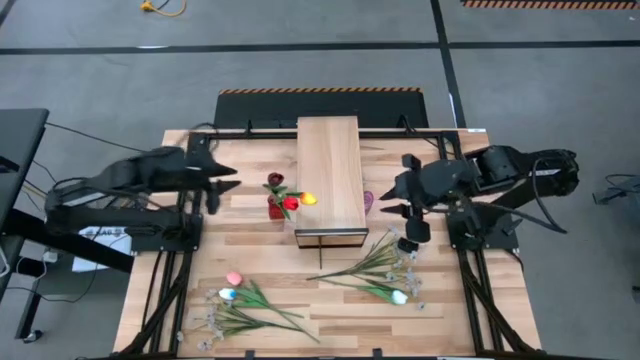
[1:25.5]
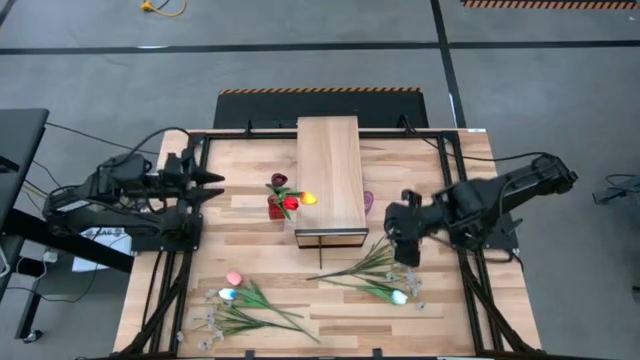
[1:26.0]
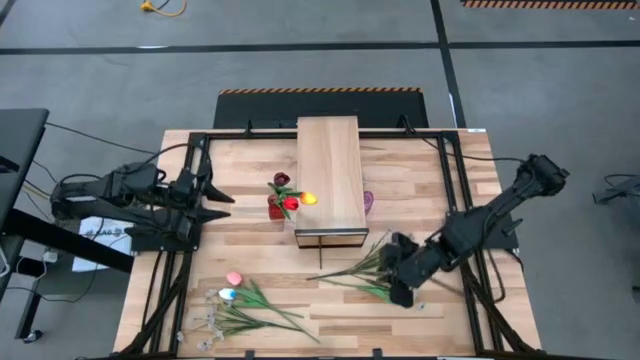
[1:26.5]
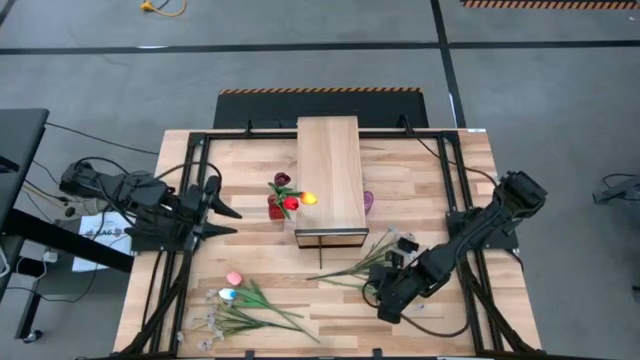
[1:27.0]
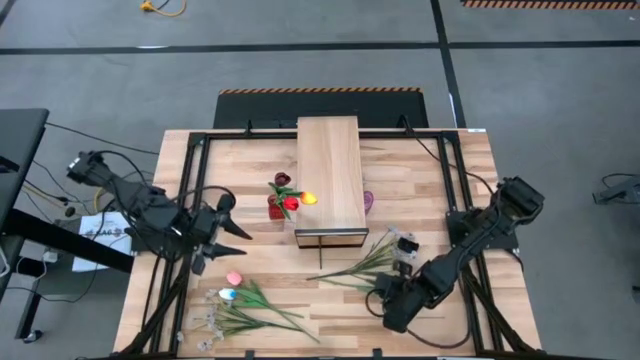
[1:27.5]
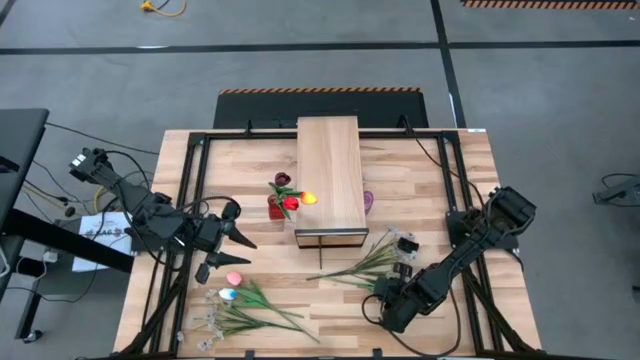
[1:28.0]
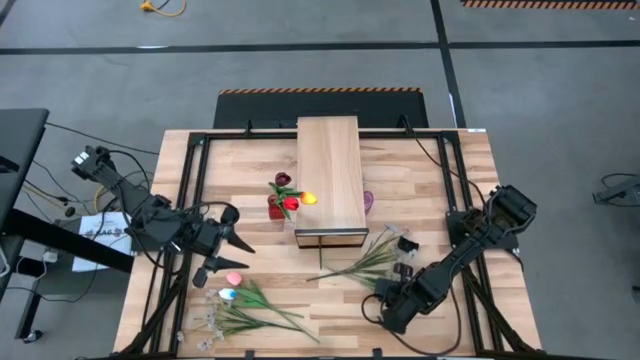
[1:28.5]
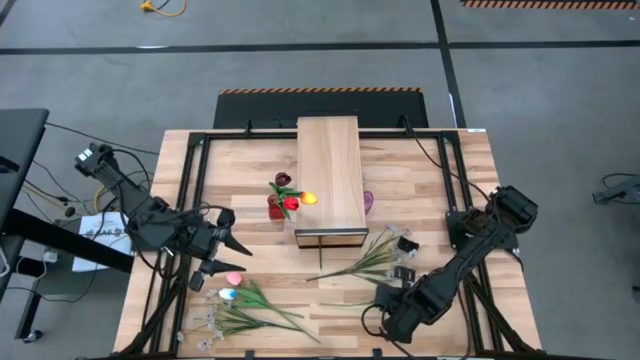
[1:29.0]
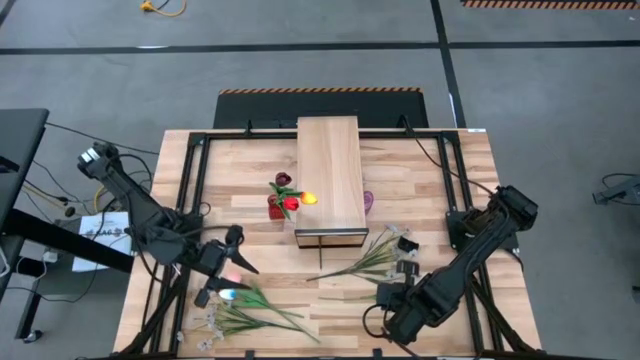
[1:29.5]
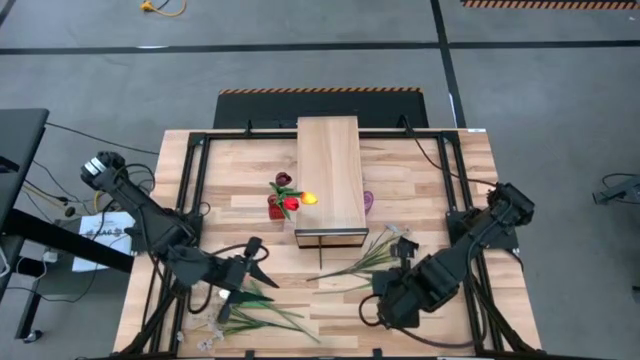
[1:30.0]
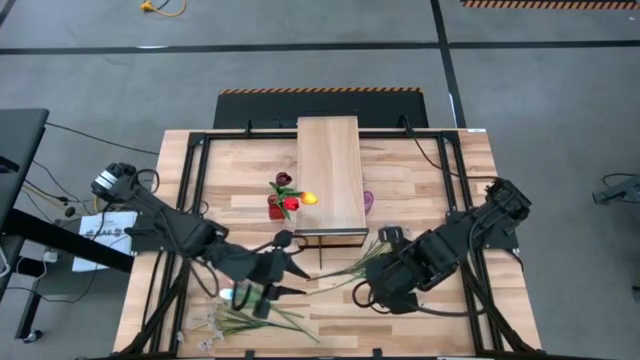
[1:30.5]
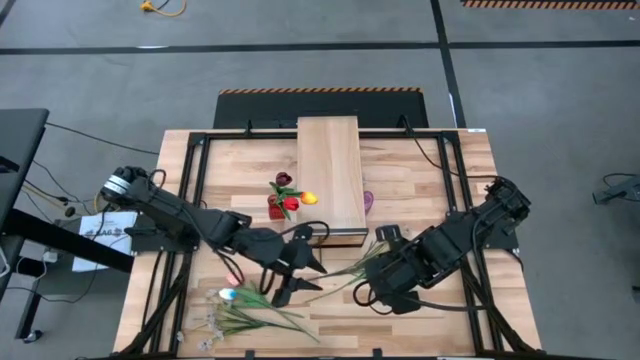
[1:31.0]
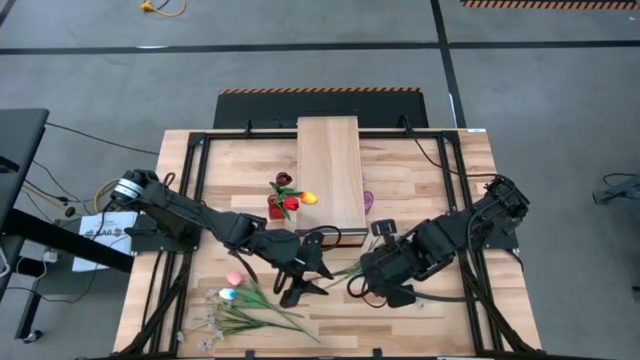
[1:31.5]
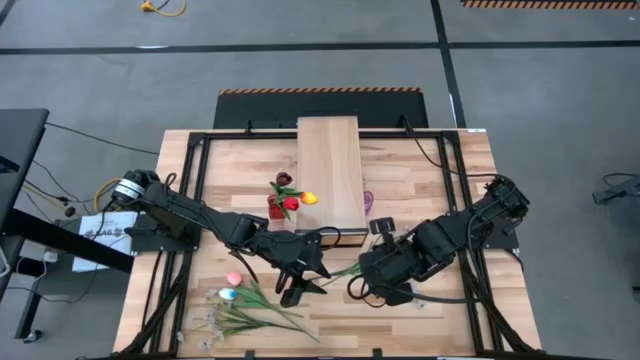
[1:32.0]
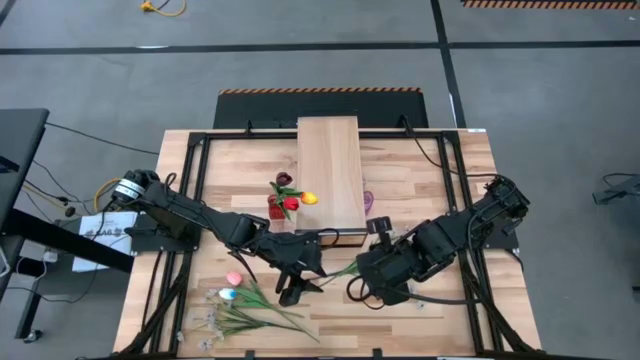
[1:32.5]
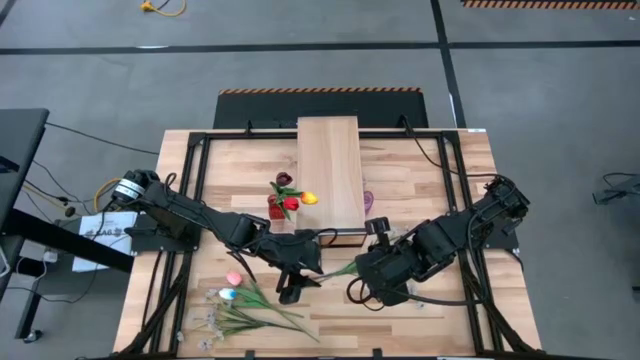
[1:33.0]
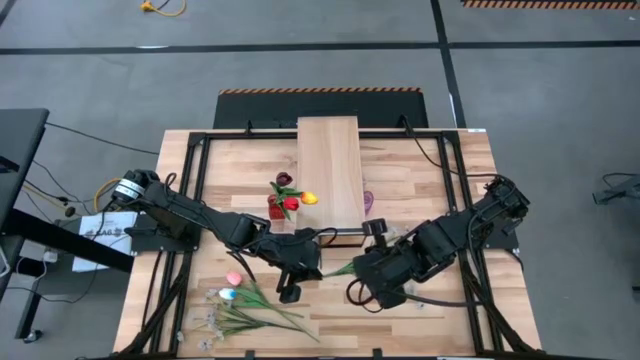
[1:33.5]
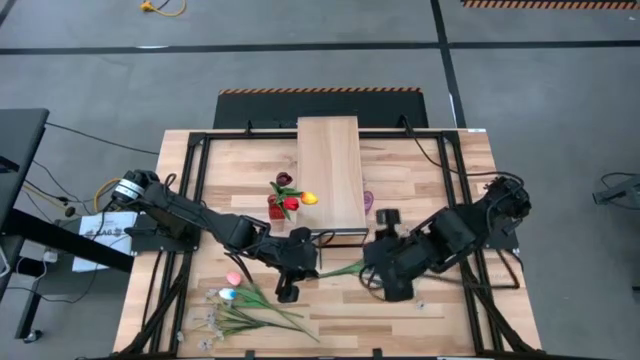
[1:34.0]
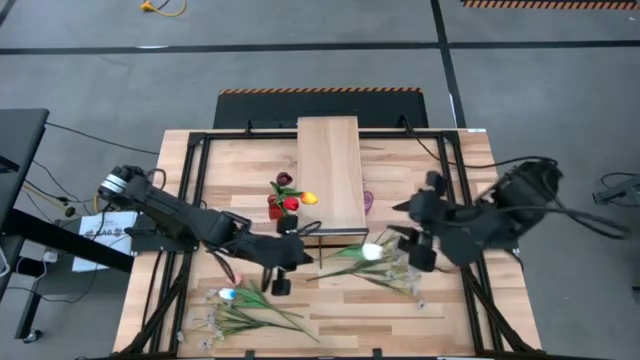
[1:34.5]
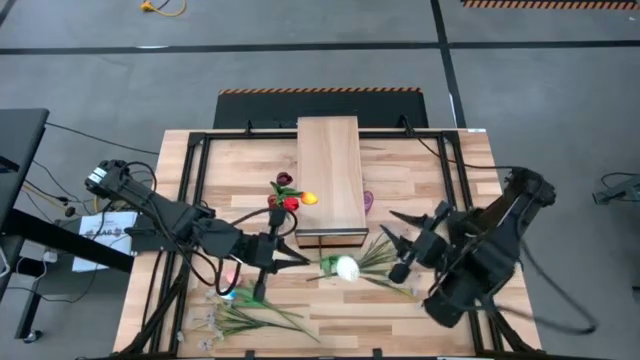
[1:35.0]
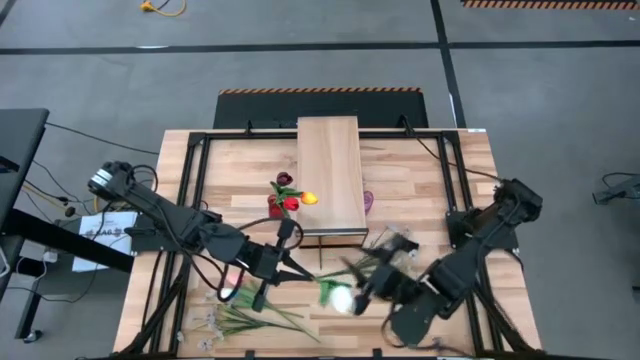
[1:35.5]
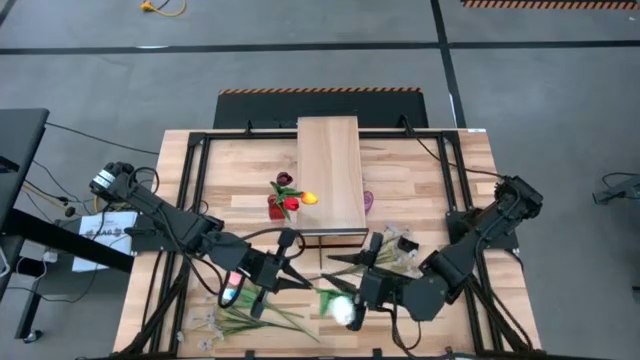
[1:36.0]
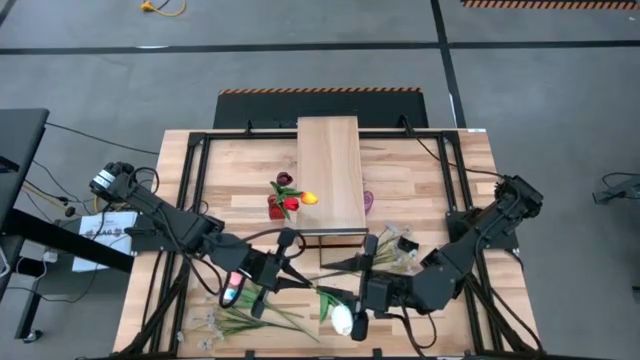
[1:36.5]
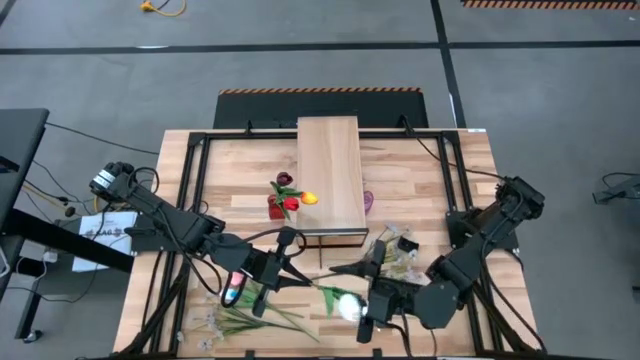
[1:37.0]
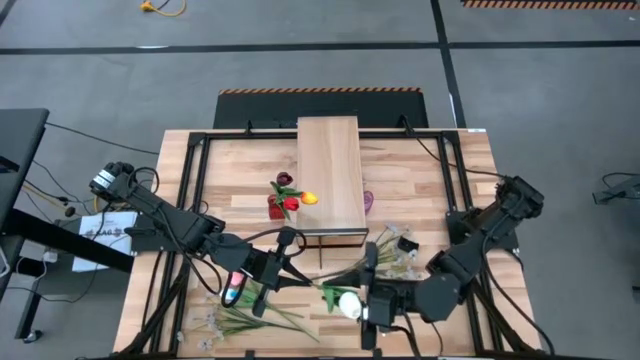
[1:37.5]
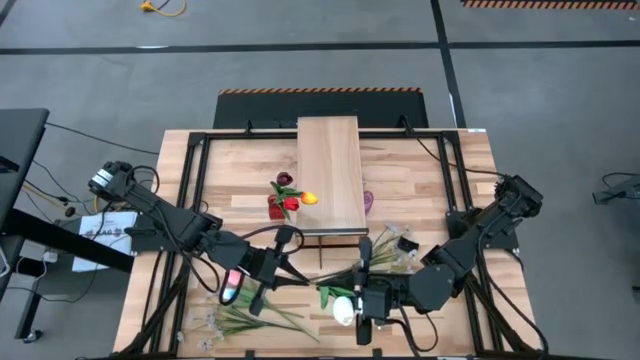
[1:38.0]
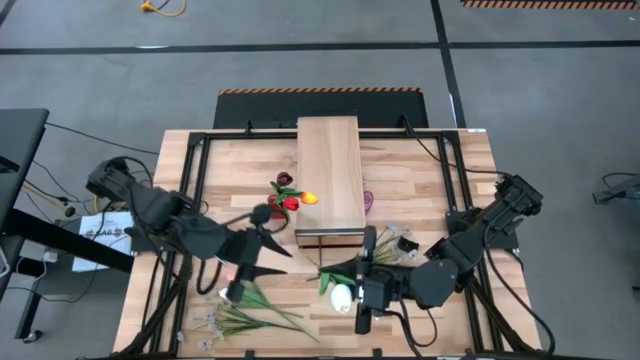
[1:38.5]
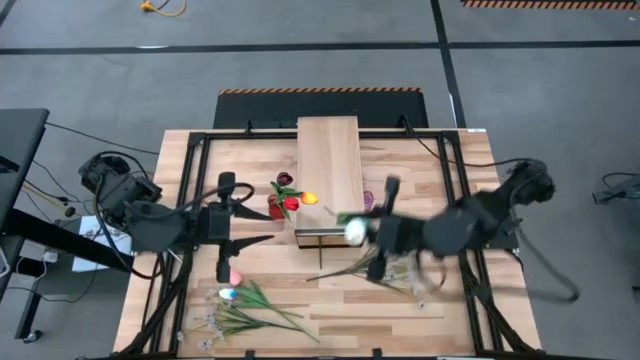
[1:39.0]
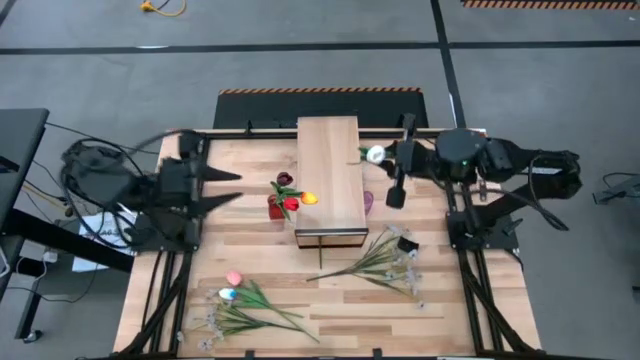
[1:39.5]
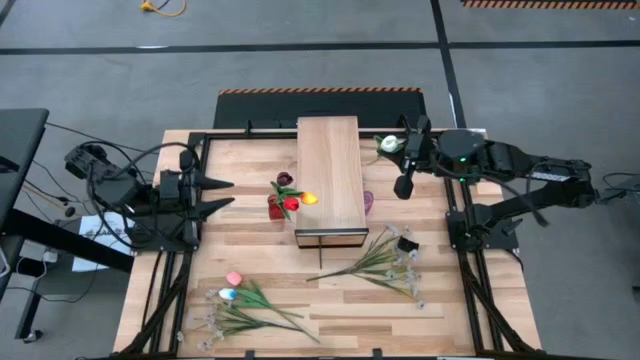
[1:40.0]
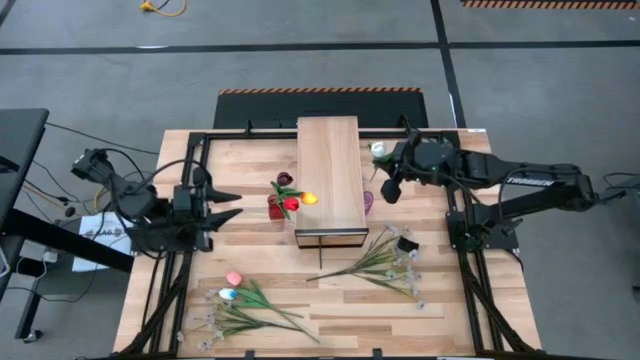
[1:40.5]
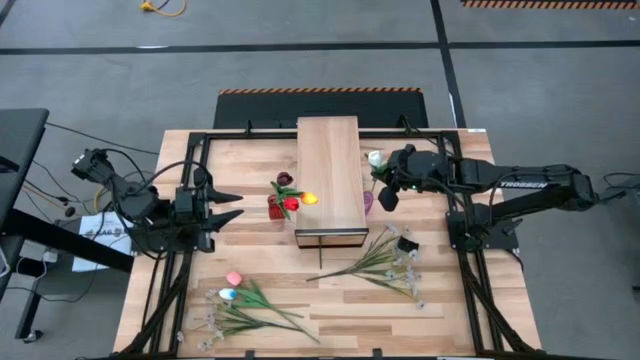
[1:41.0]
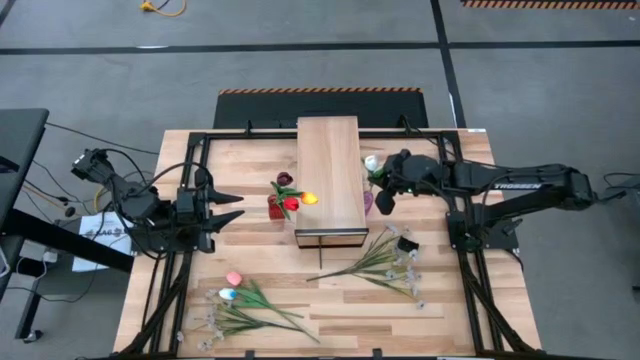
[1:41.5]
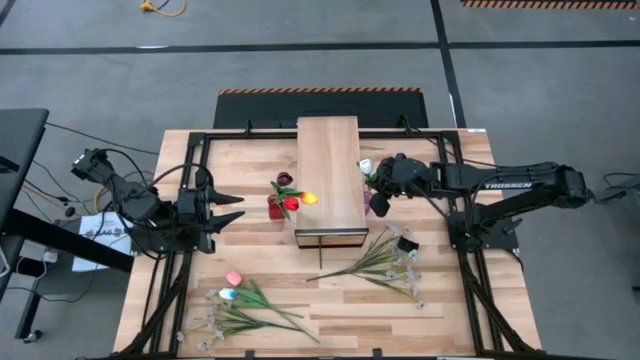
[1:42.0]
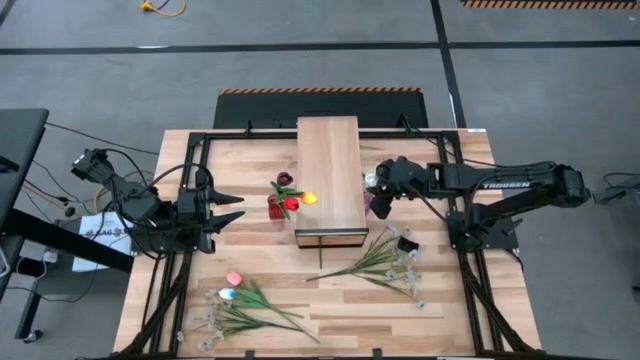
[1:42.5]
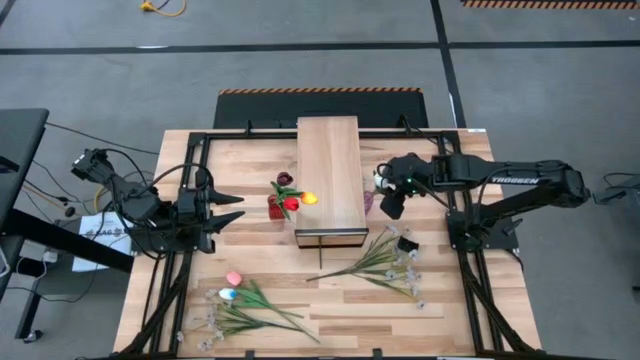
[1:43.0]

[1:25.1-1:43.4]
Task: Pick and place flowers into a vace then onto a shelf
Put the light blue tulip into the purple flower vase

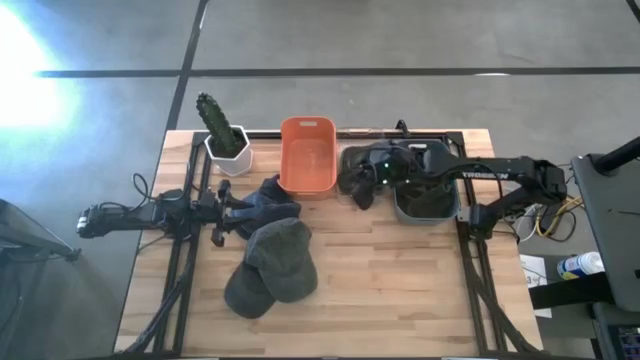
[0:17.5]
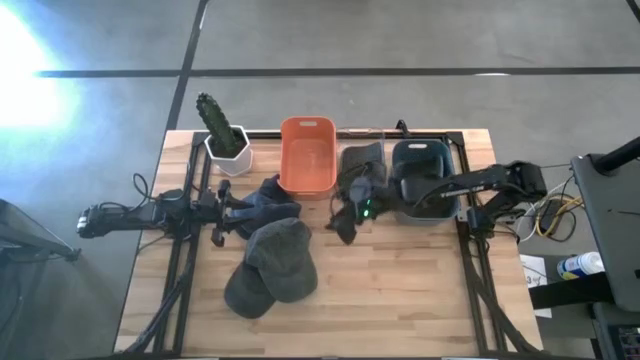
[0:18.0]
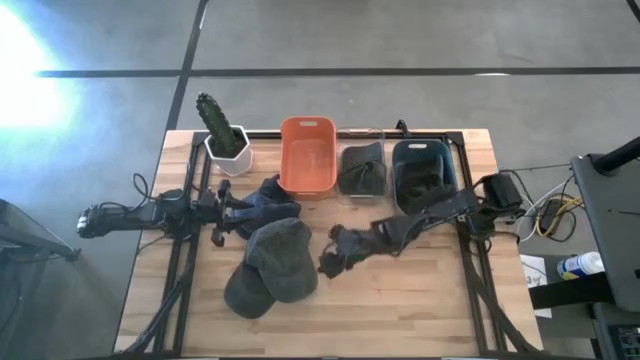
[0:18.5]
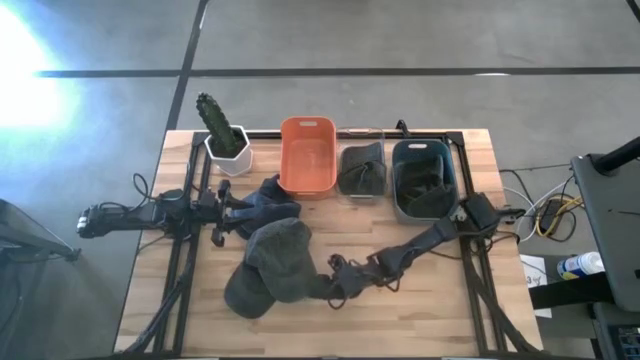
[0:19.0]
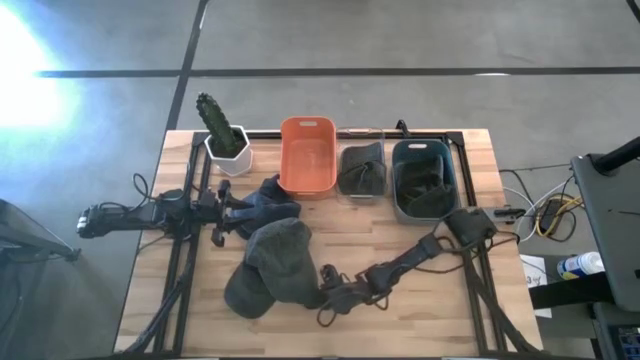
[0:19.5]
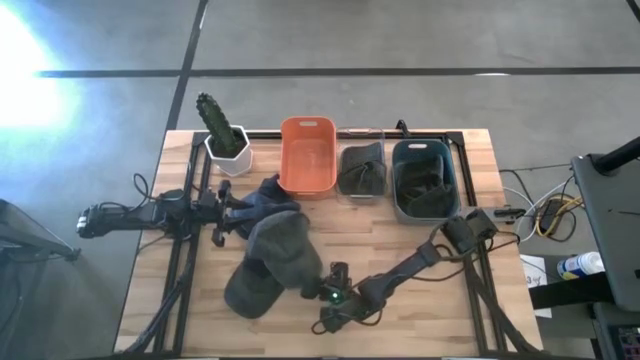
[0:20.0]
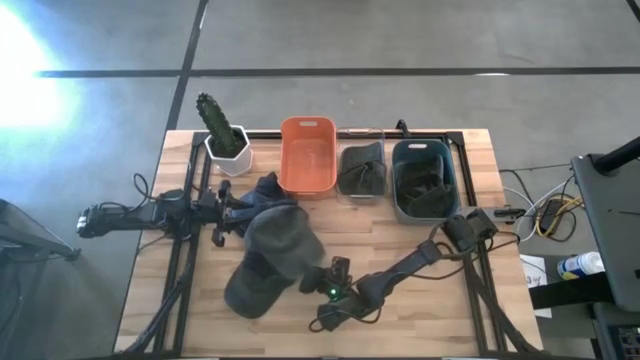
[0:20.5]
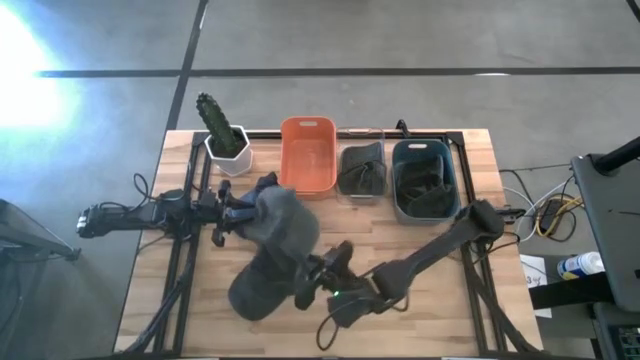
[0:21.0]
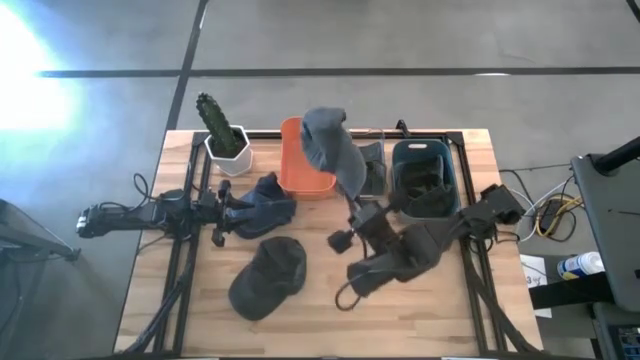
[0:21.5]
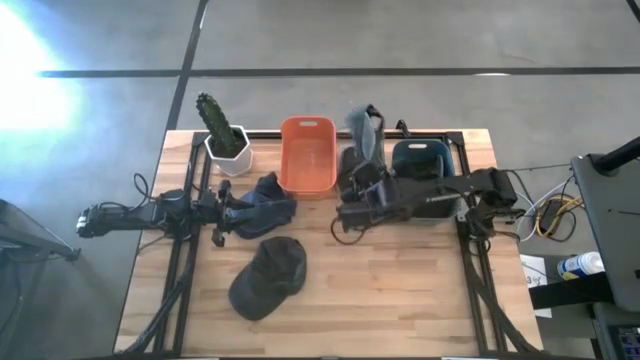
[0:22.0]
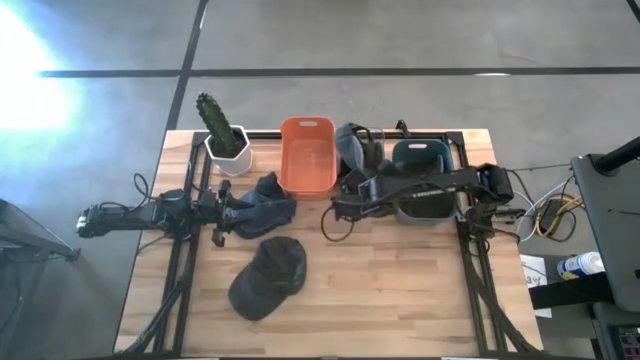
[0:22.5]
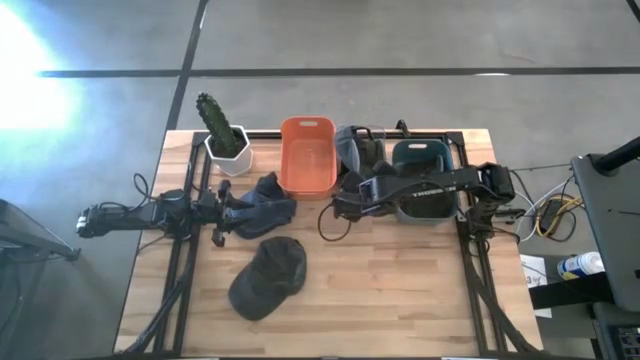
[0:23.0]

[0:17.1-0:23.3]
Task: Pick & Place hat
Put the gray cap into the transparent bin
